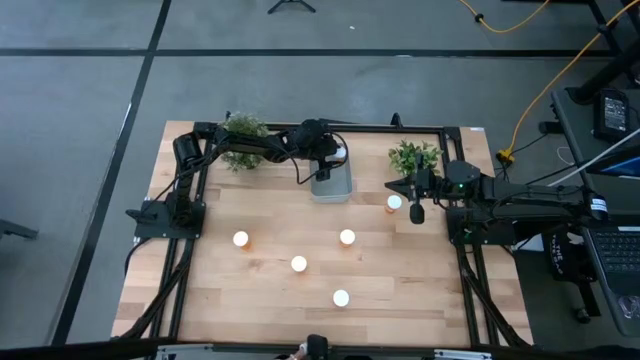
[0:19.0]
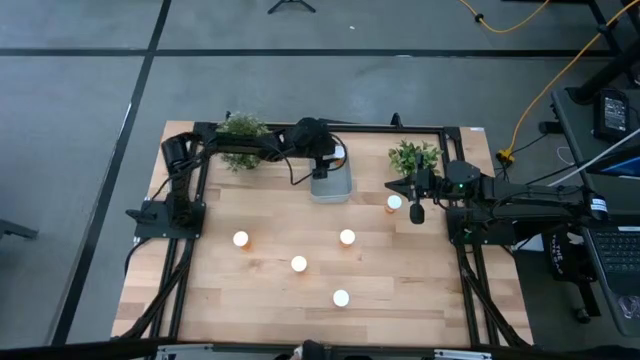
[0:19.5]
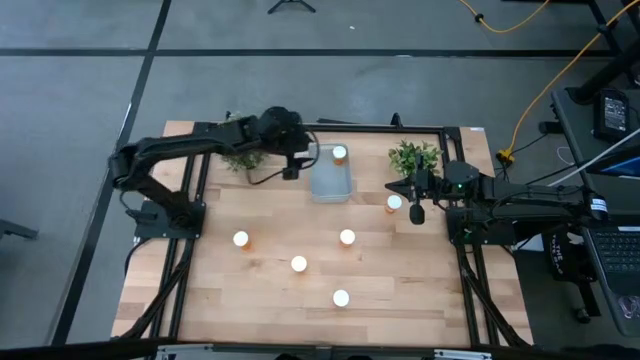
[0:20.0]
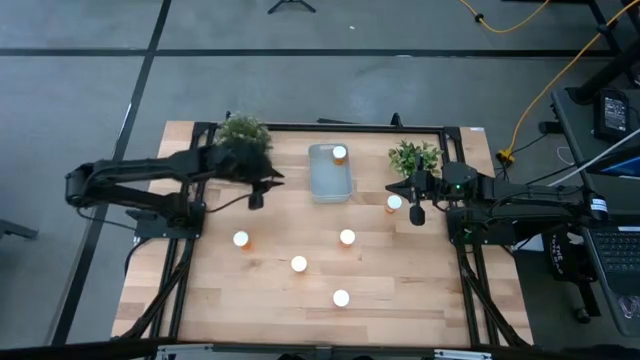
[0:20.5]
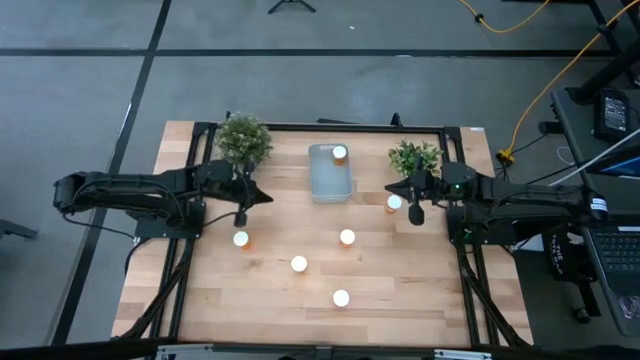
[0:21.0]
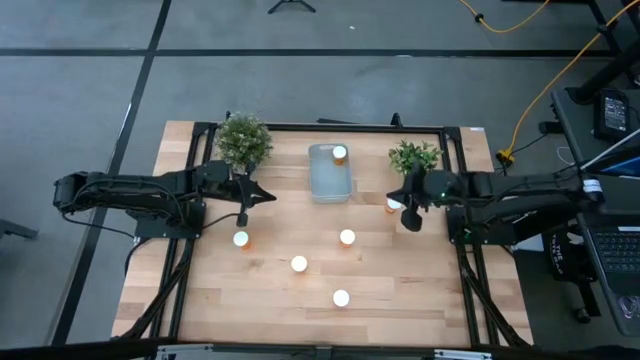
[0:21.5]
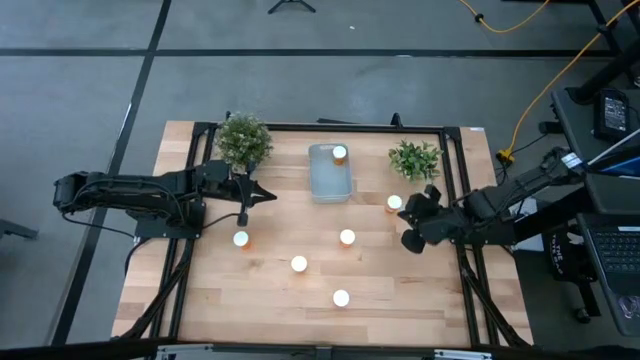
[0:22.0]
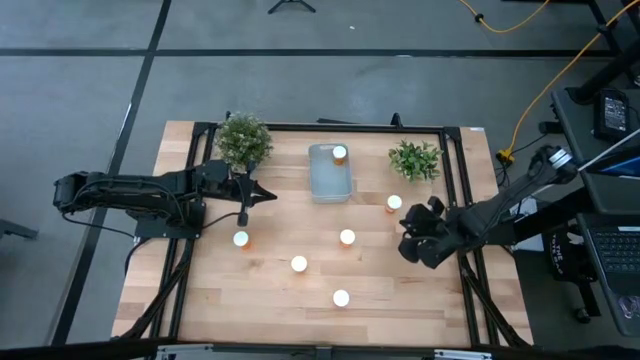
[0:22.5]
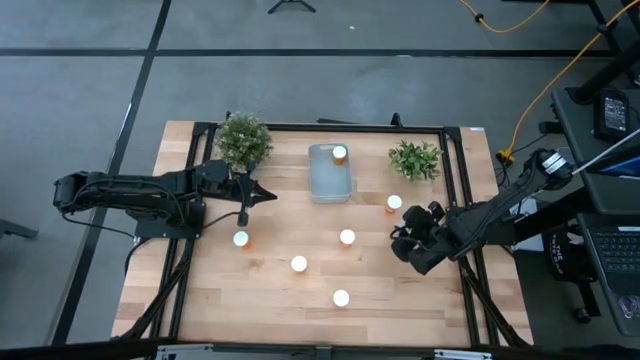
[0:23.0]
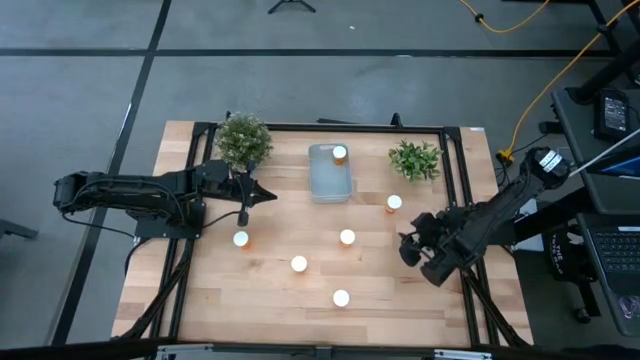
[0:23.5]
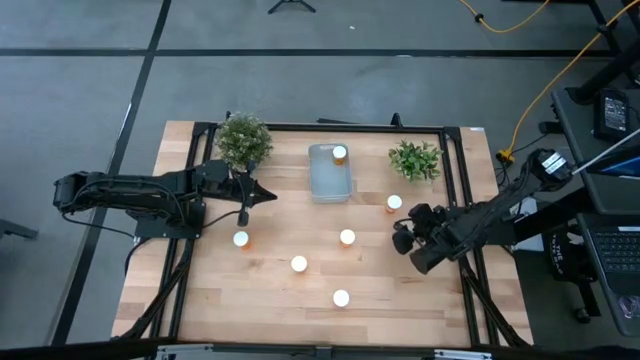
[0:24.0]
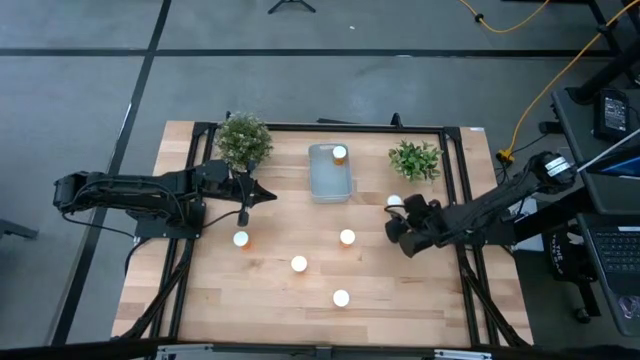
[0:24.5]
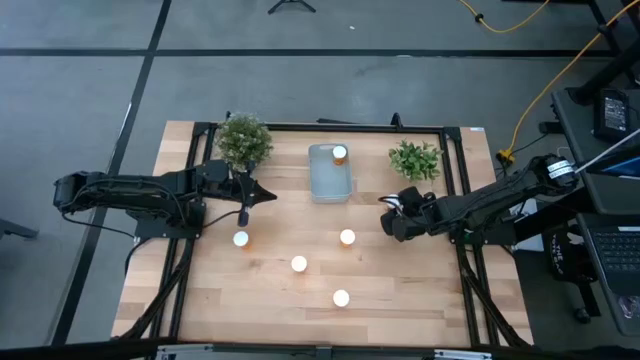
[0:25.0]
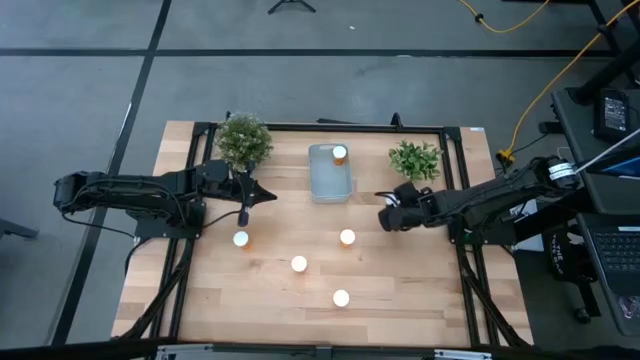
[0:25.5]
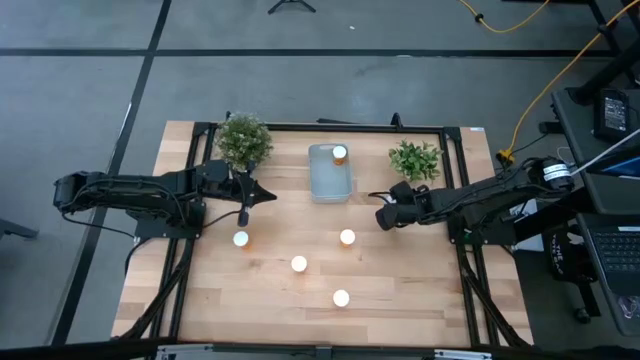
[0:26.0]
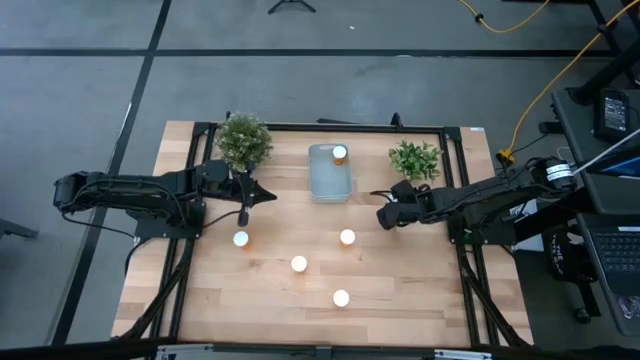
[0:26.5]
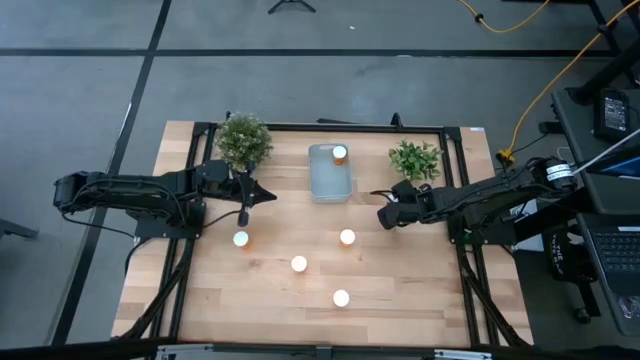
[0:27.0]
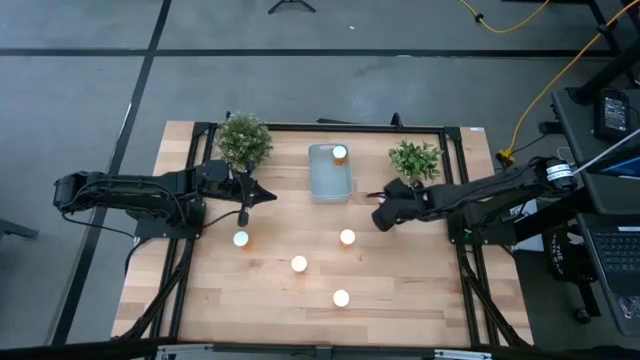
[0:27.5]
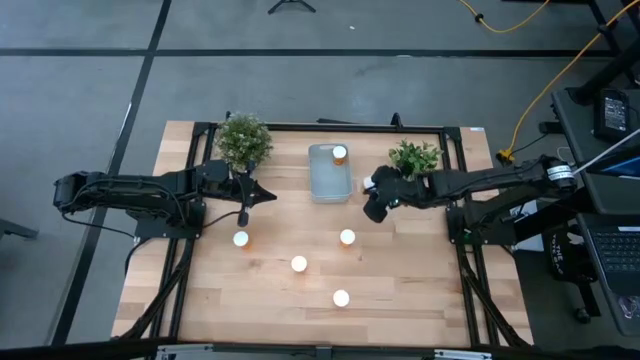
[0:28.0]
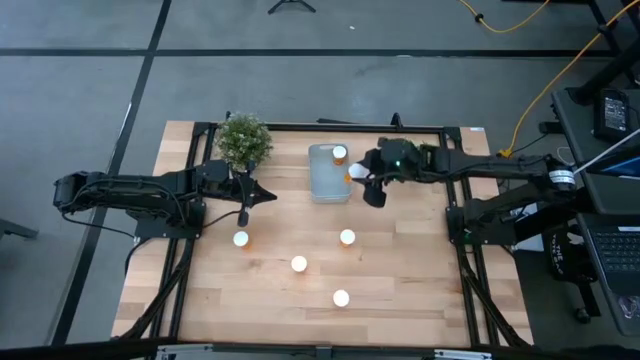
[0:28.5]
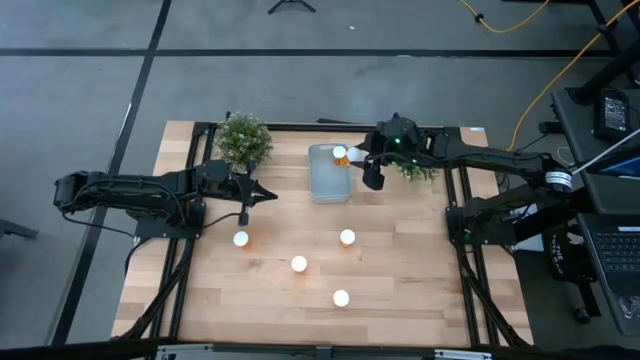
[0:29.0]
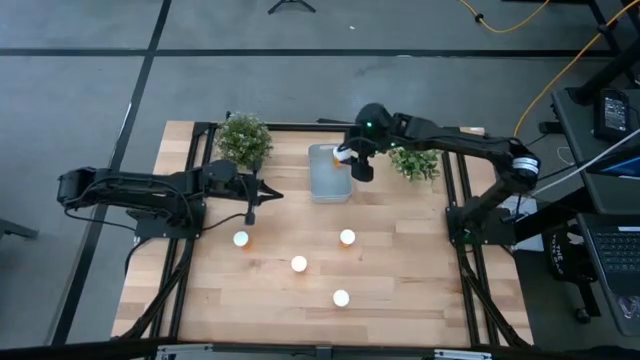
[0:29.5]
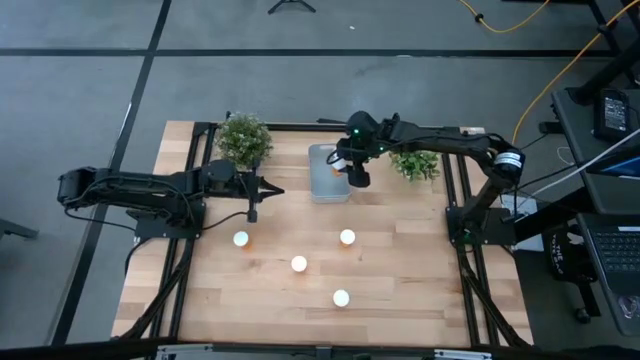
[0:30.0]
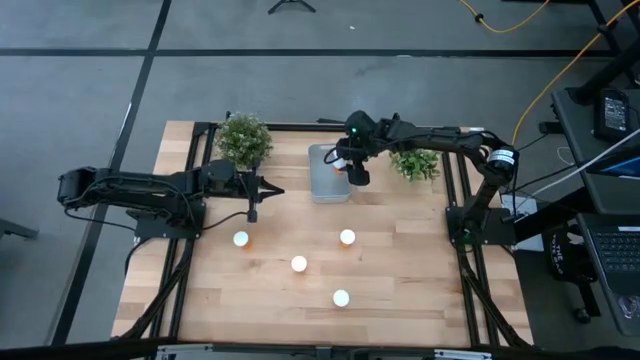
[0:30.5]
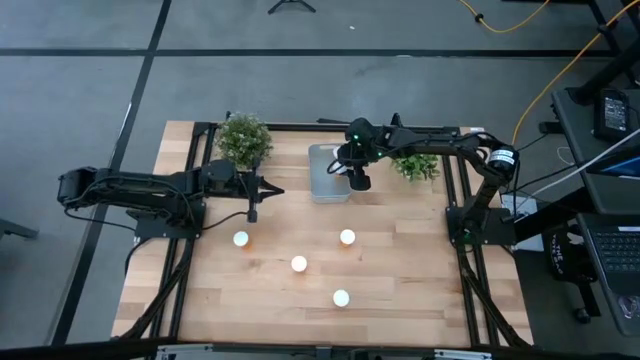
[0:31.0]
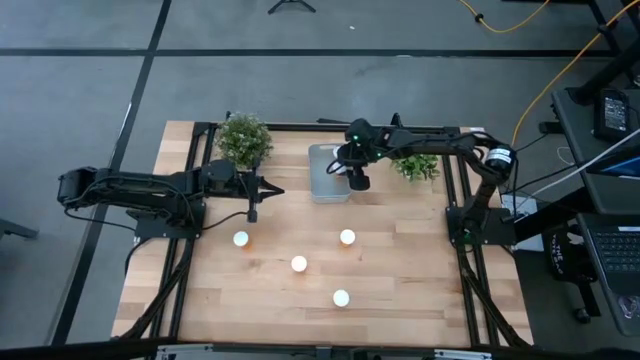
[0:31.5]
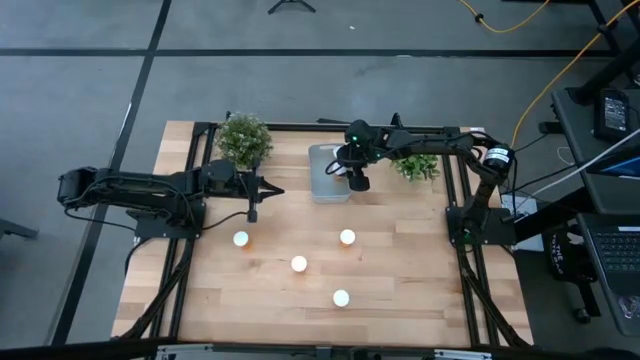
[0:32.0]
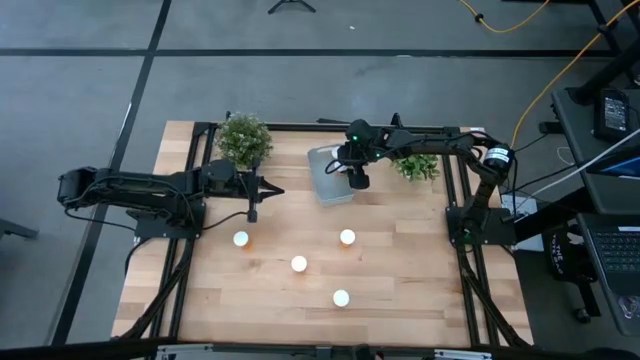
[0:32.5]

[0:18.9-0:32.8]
Task: Pick and place pill bottles into a basket
Put the orange pill bottle into the gray bin

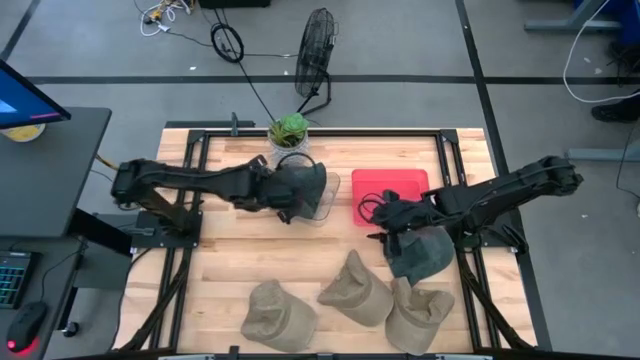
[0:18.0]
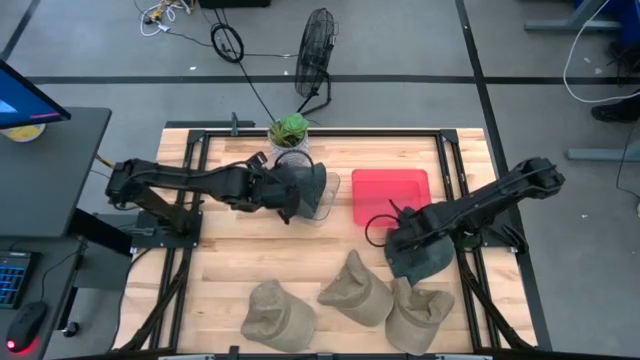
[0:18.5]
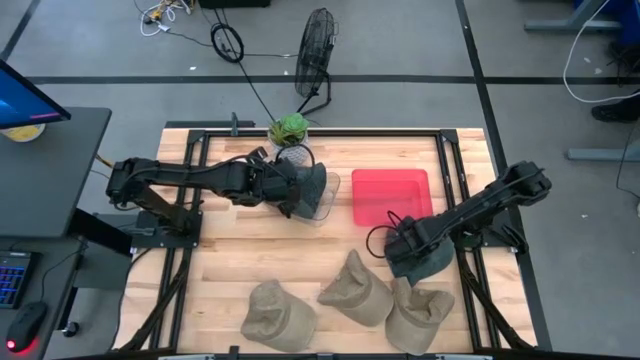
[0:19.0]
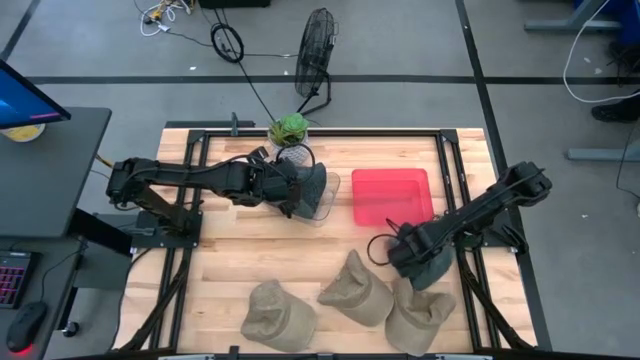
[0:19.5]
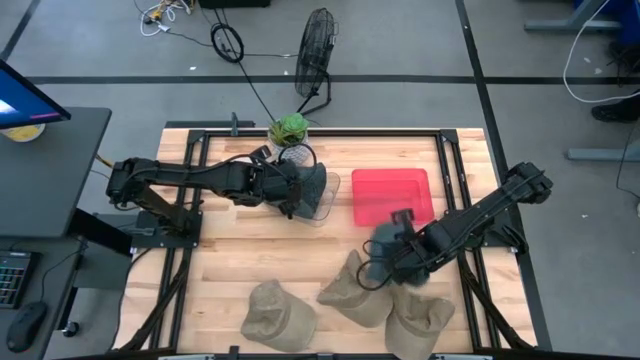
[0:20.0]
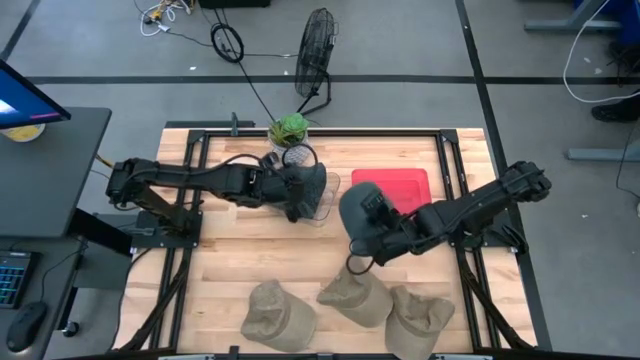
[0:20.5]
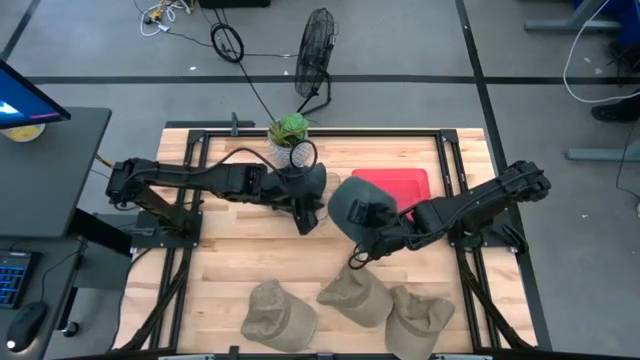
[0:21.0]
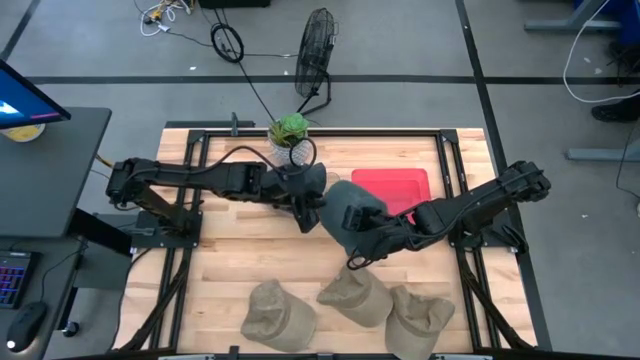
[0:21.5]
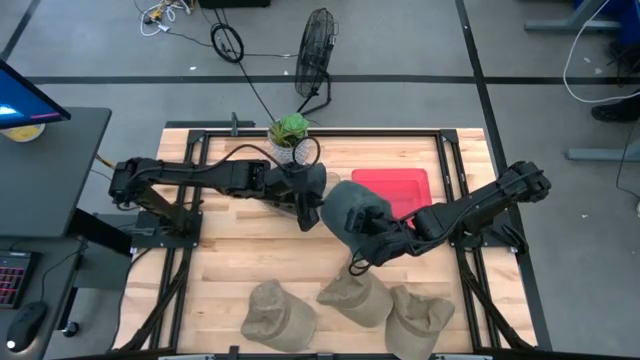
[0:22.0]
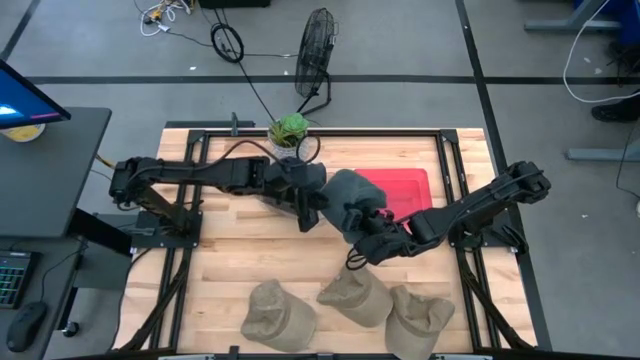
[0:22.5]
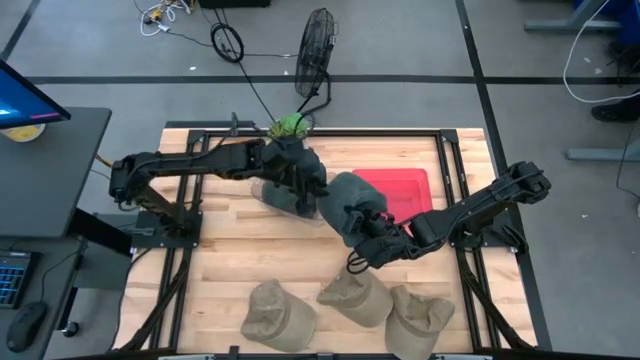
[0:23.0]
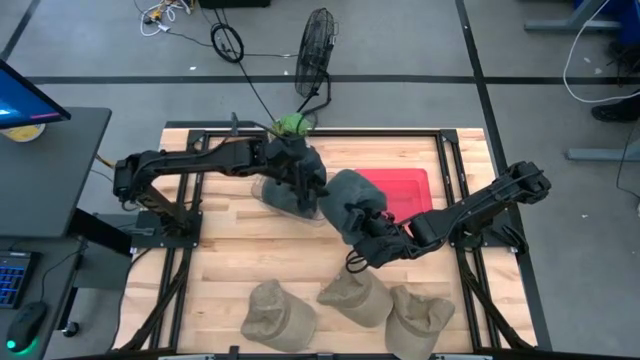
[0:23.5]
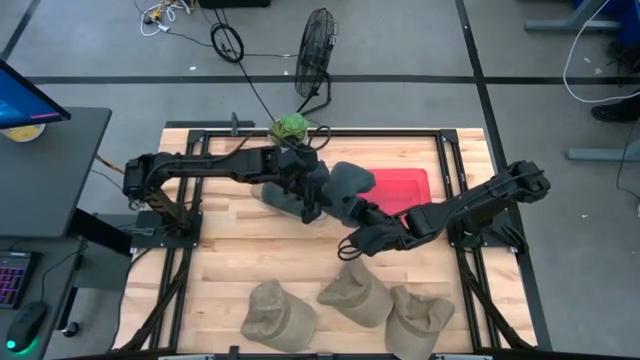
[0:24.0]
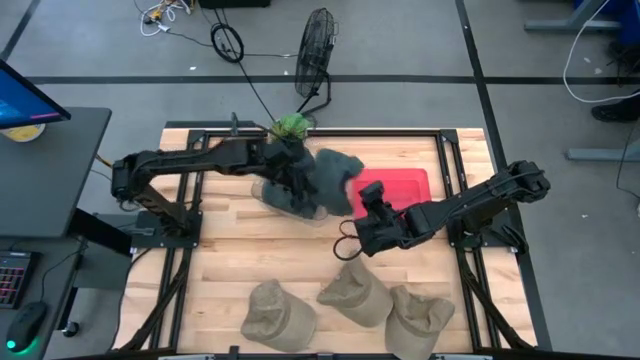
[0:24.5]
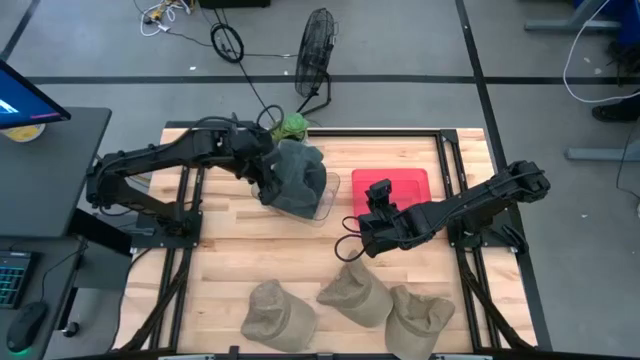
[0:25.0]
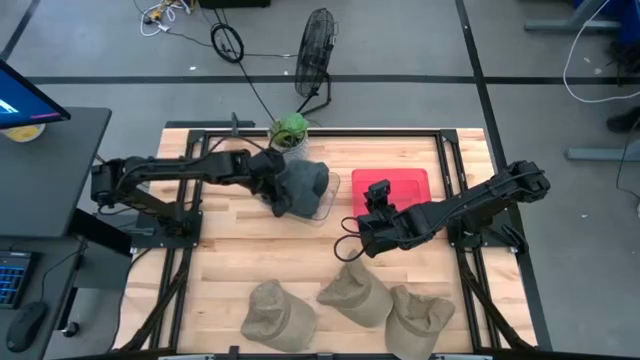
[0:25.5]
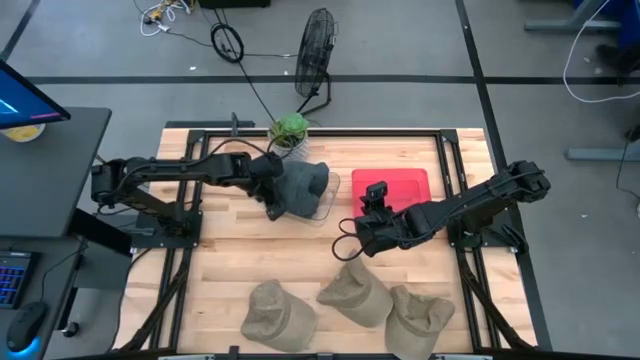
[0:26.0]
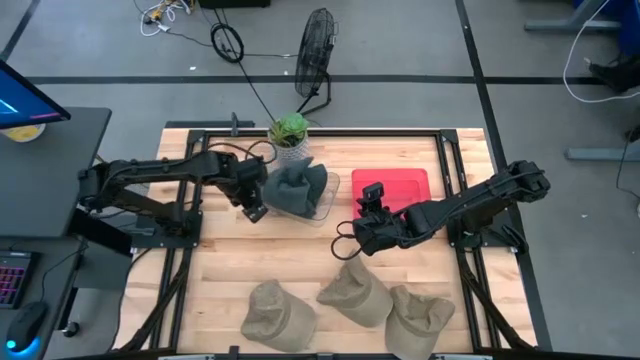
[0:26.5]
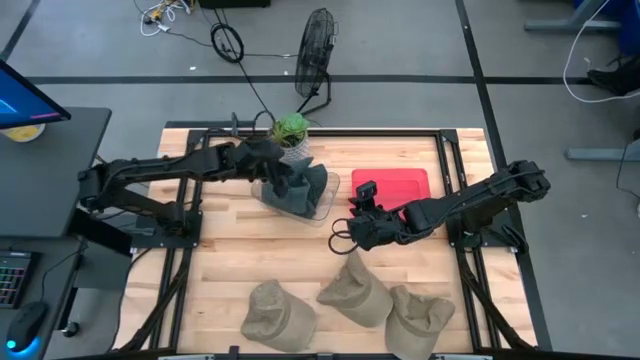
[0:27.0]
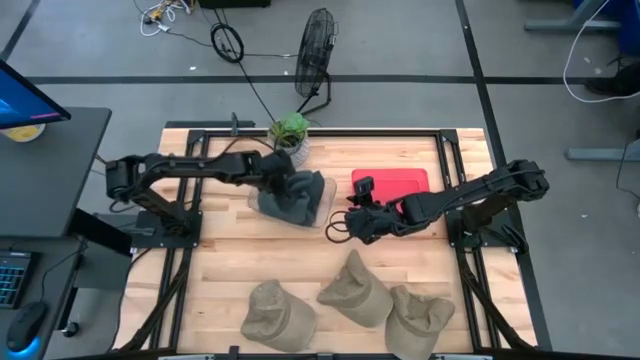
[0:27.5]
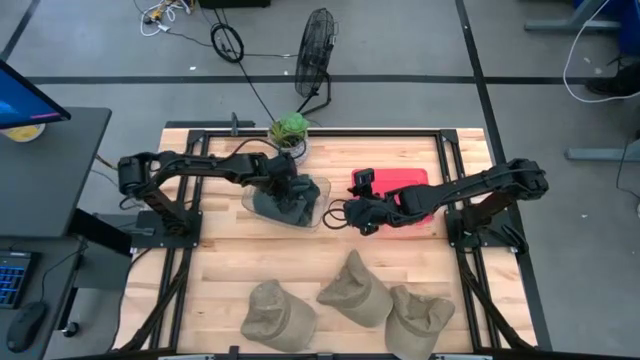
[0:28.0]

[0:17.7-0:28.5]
Task: Pick & Place hat
Put the green cap into the transparent bin
